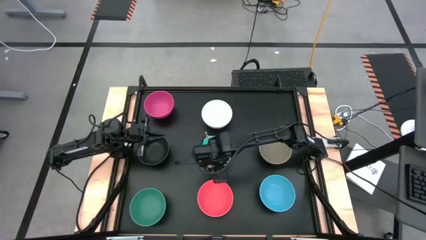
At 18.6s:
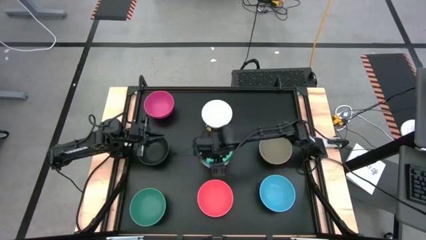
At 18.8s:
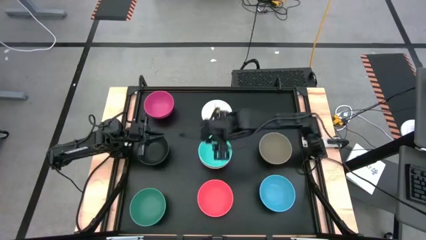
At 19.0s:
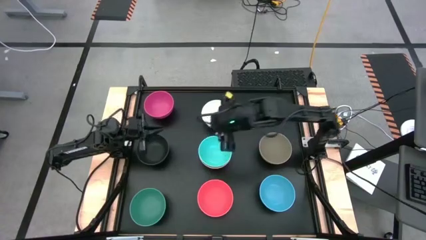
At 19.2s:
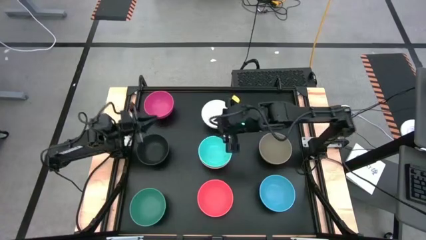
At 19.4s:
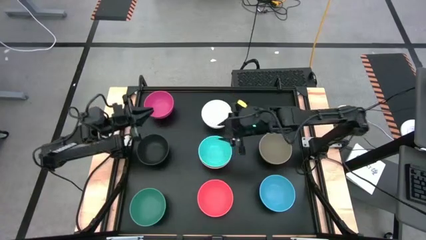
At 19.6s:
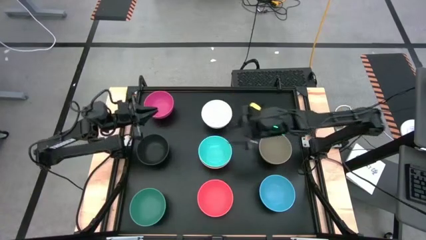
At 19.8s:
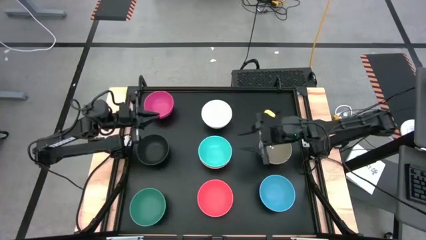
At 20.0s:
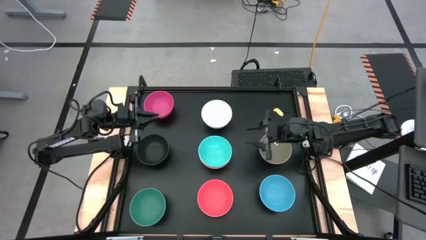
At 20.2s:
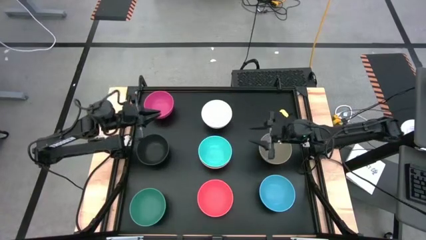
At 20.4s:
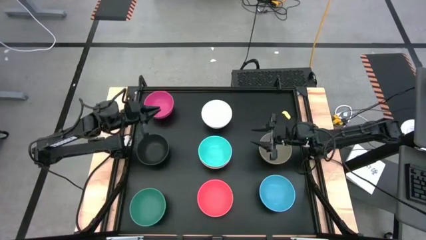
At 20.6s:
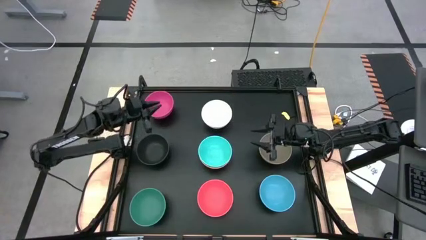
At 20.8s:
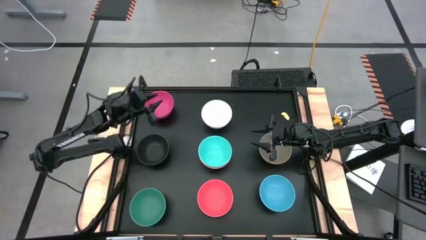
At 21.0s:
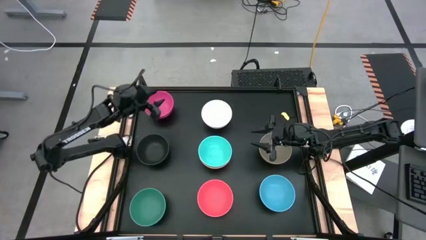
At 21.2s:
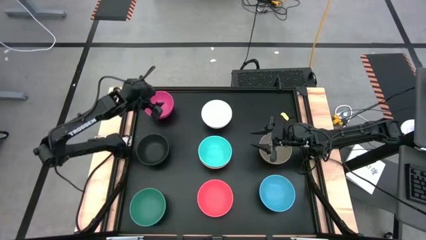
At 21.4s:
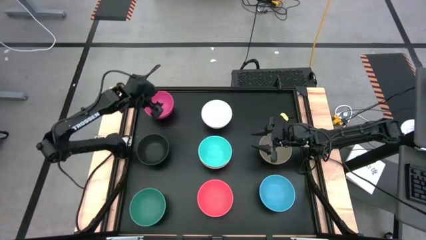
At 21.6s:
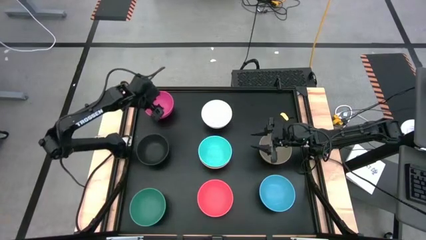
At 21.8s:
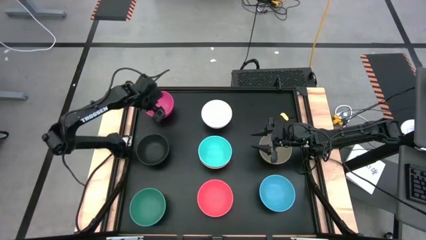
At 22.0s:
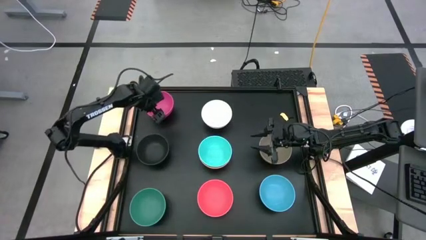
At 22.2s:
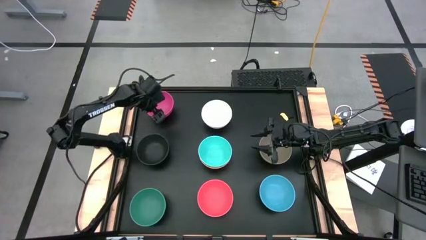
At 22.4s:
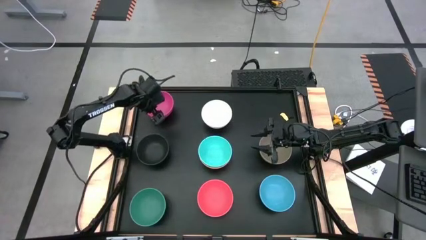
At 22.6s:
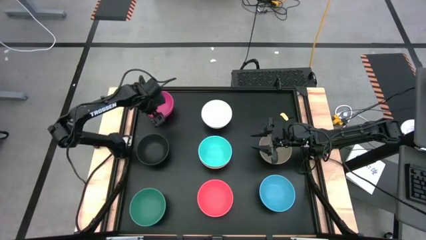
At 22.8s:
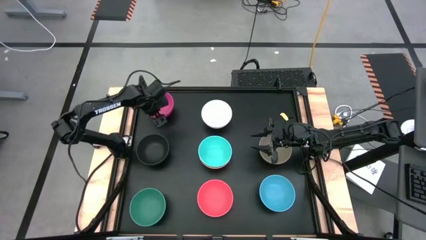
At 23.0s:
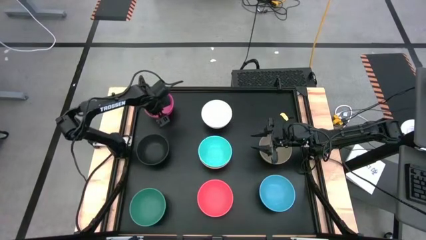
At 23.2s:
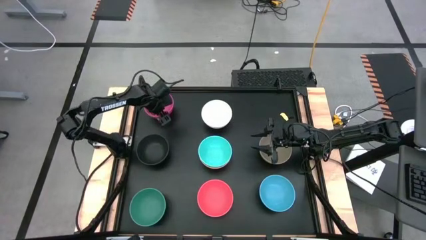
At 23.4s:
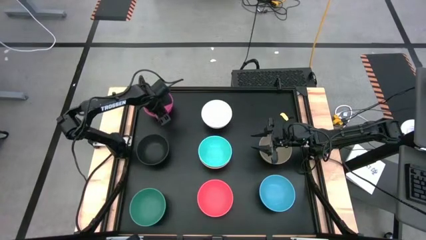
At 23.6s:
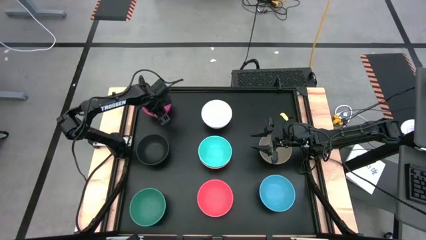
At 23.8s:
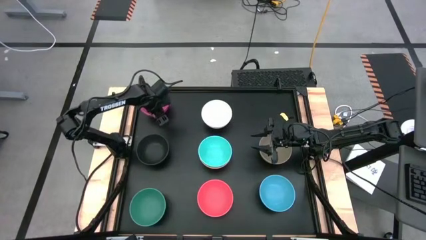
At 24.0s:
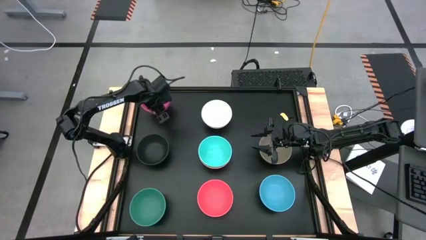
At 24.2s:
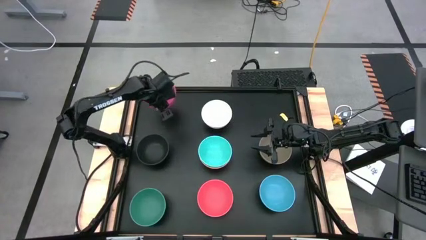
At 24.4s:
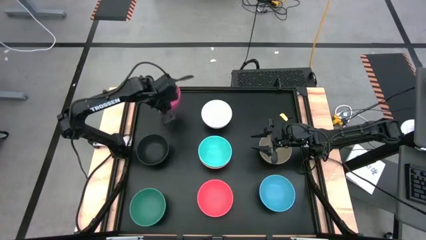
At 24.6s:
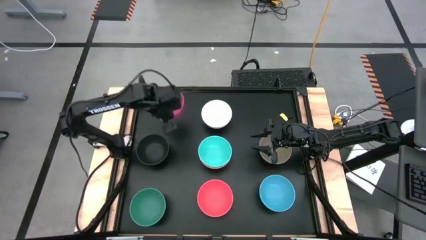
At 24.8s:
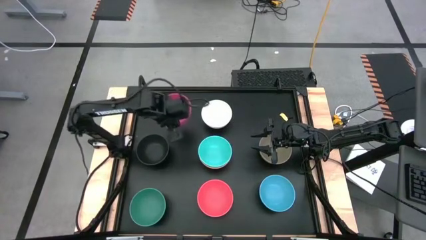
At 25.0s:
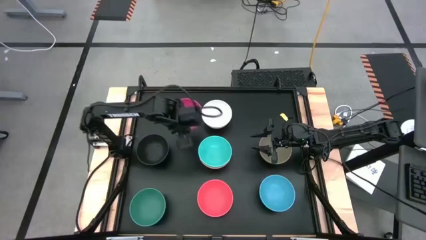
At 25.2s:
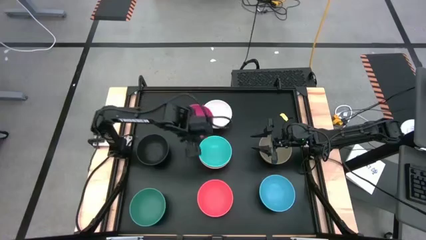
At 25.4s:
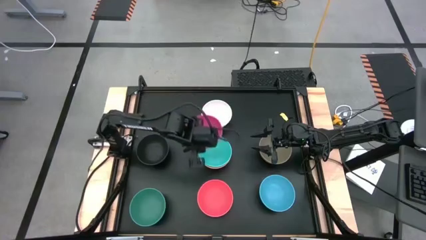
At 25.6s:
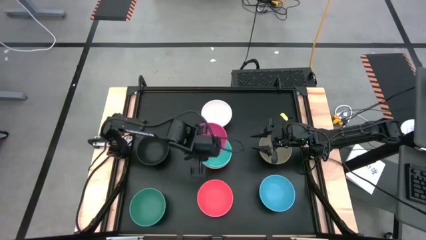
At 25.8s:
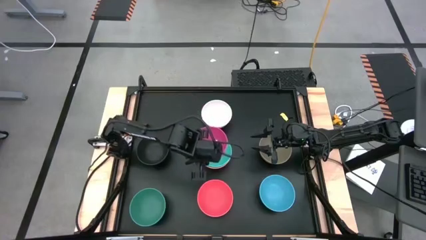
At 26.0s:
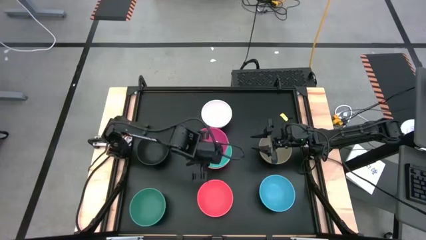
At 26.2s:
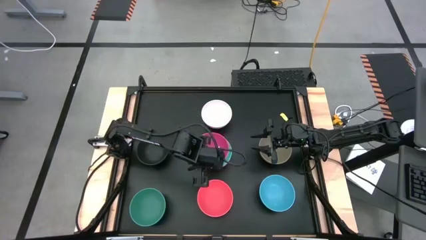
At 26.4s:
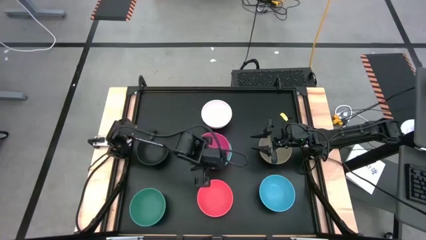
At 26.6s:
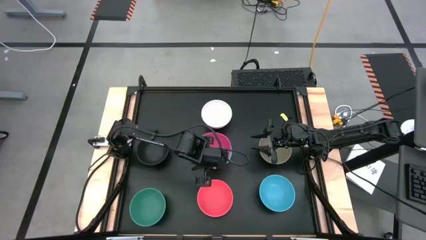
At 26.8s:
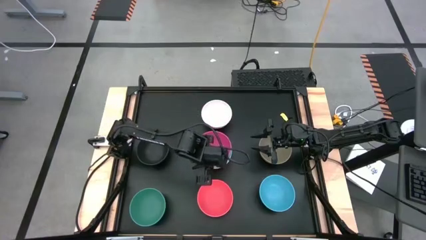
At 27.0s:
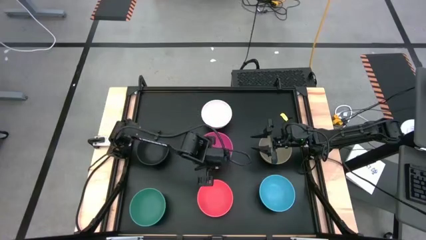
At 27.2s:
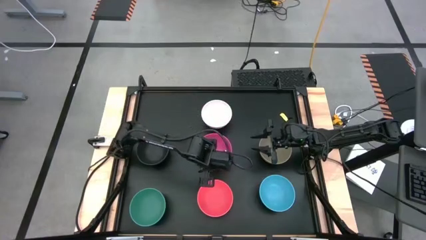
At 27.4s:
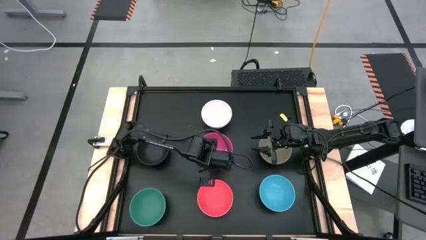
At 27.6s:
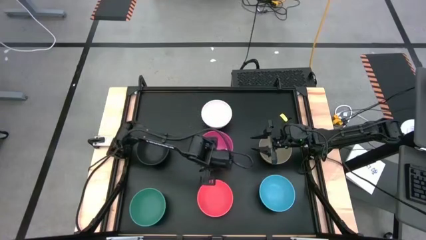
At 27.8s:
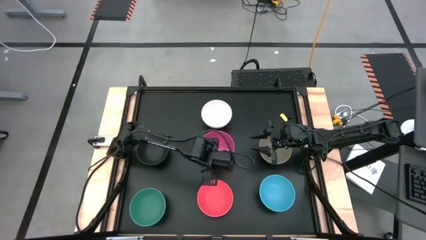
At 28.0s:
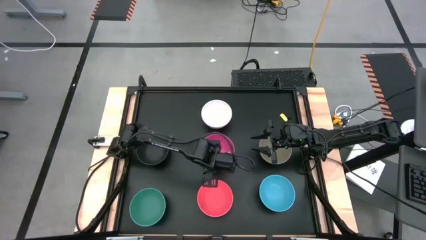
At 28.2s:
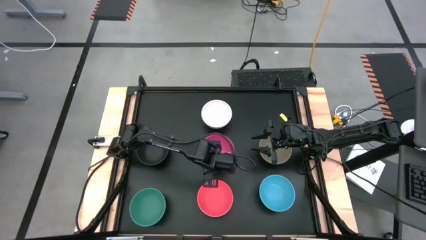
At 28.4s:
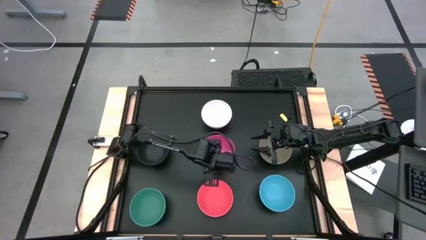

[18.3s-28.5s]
Task: Nest bowls inside each other
Stack the pink bowl on top of the light blue bowl

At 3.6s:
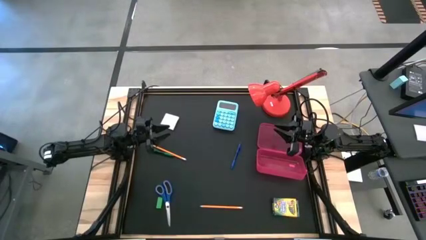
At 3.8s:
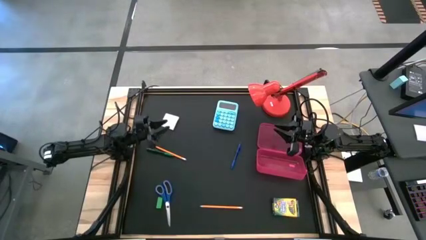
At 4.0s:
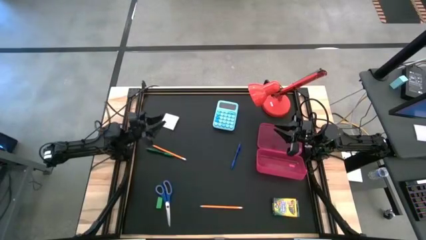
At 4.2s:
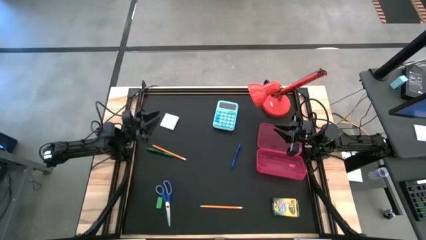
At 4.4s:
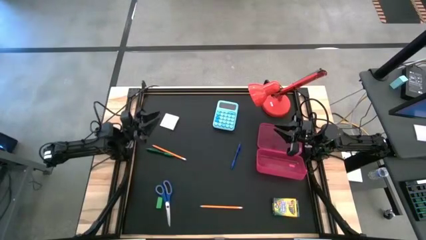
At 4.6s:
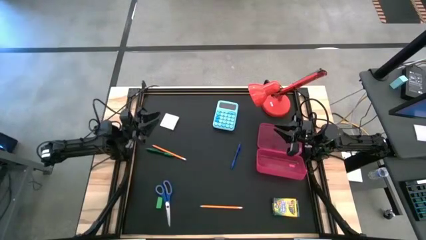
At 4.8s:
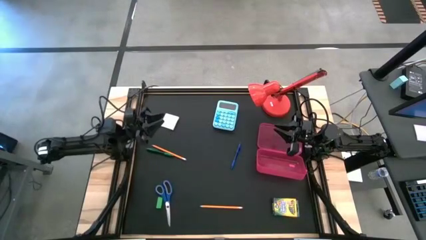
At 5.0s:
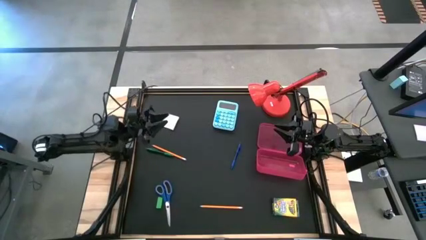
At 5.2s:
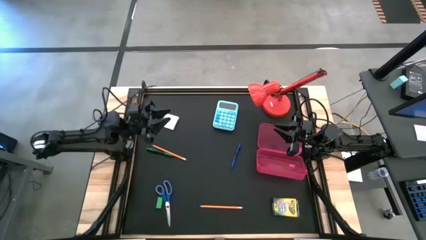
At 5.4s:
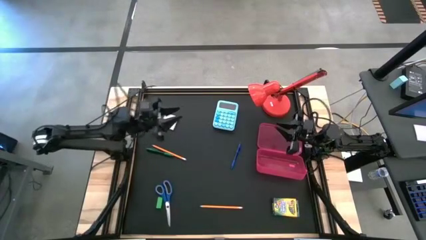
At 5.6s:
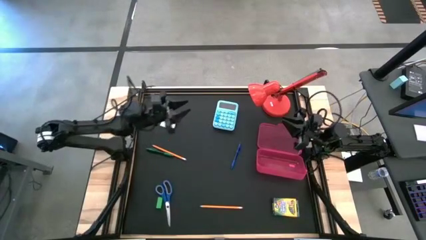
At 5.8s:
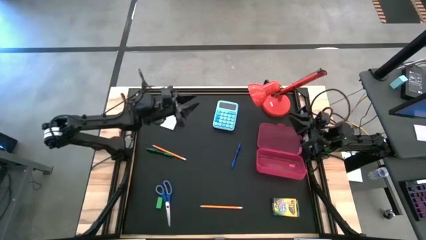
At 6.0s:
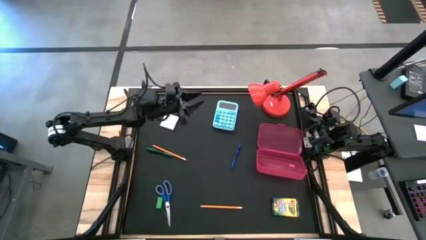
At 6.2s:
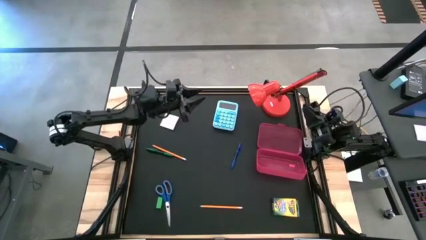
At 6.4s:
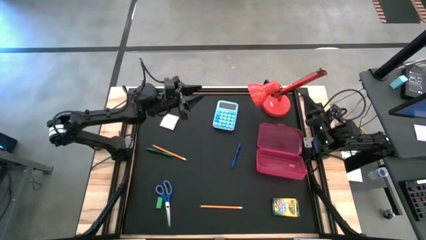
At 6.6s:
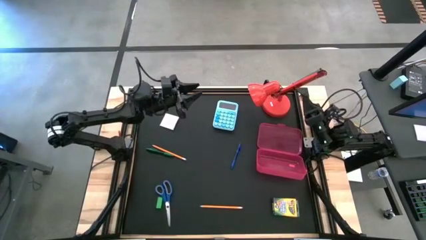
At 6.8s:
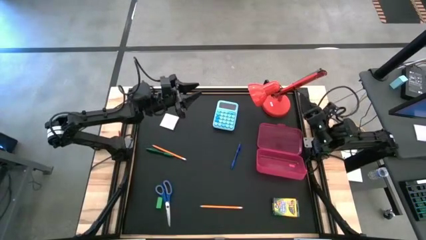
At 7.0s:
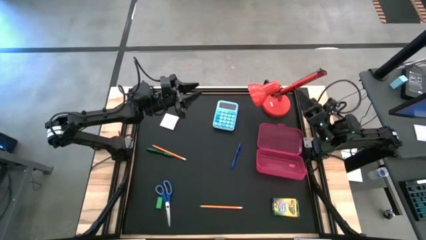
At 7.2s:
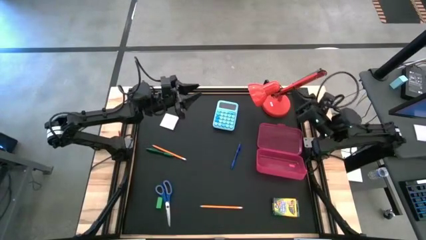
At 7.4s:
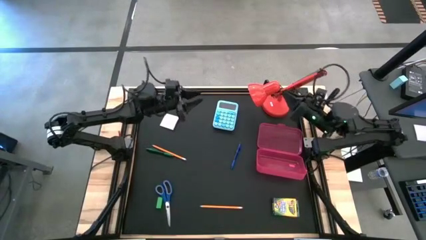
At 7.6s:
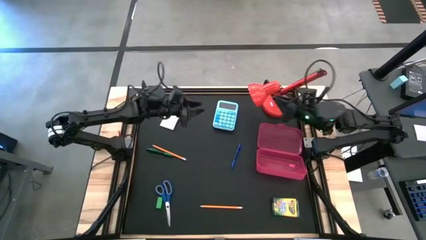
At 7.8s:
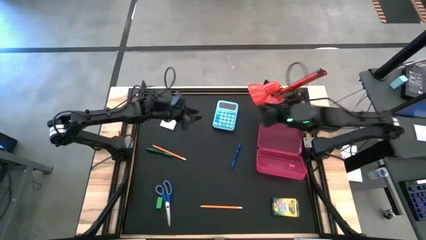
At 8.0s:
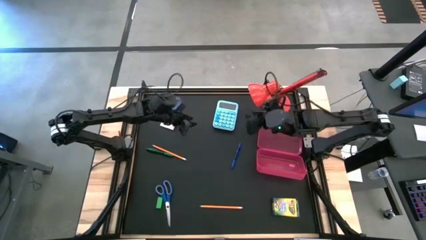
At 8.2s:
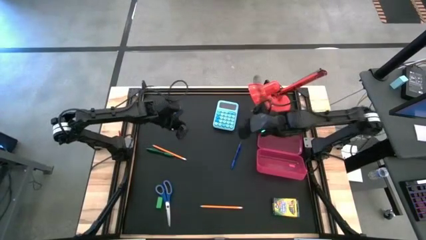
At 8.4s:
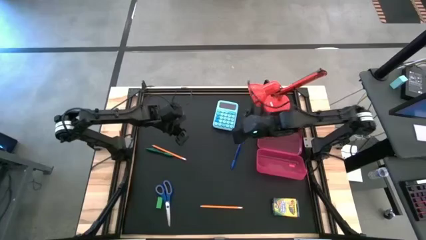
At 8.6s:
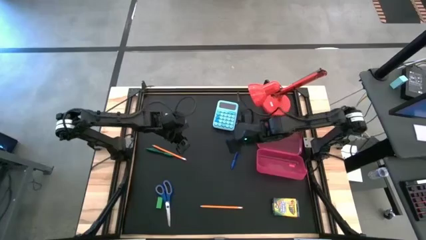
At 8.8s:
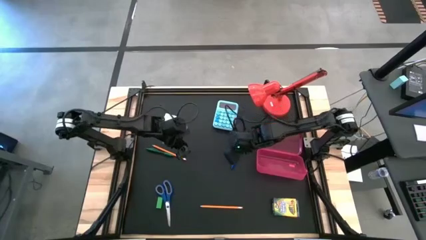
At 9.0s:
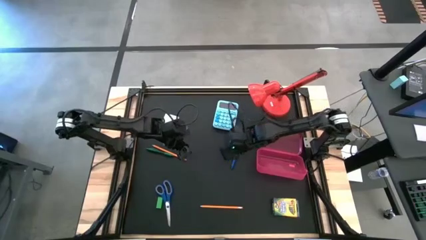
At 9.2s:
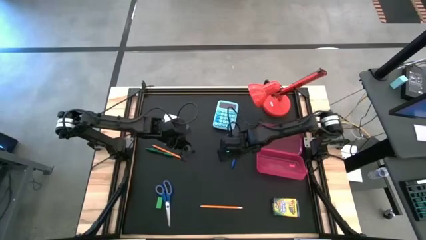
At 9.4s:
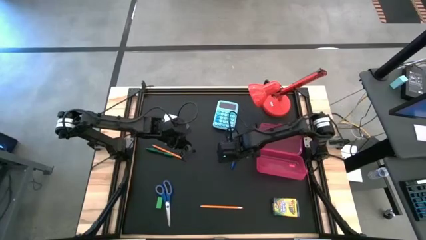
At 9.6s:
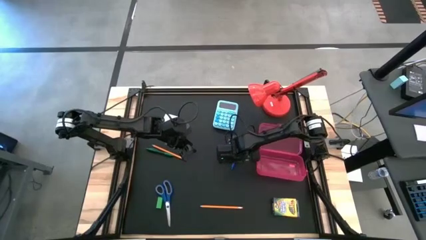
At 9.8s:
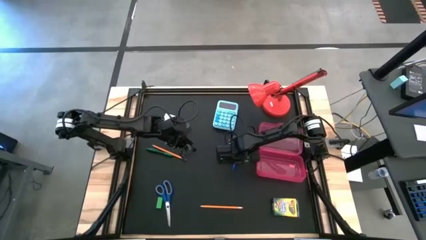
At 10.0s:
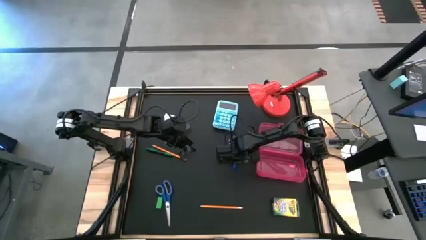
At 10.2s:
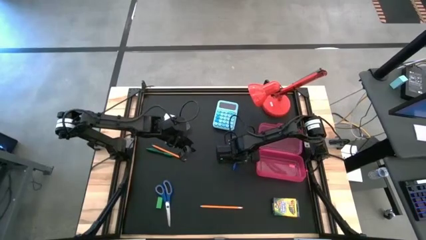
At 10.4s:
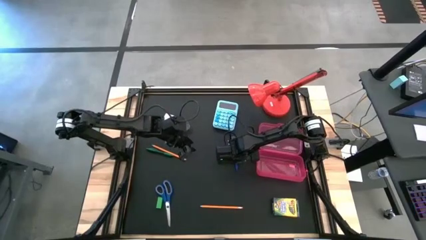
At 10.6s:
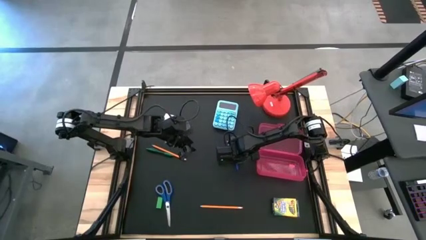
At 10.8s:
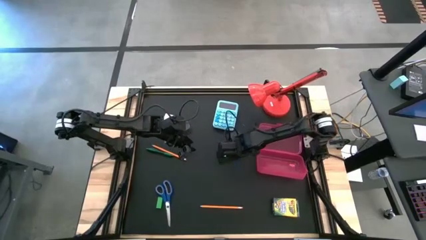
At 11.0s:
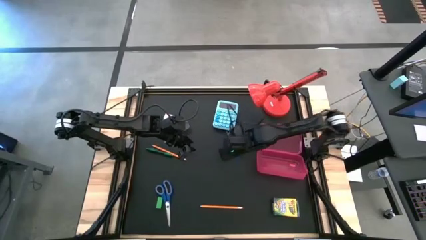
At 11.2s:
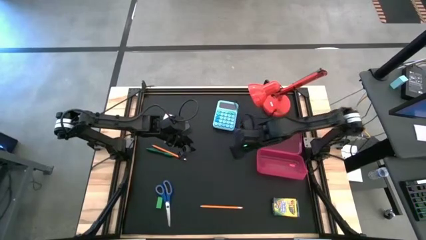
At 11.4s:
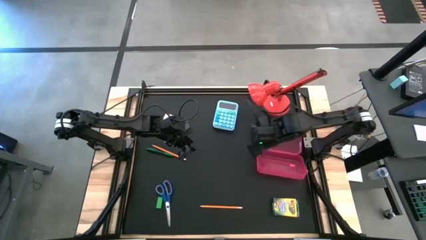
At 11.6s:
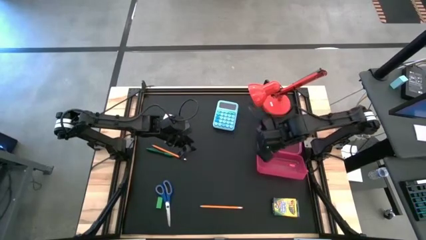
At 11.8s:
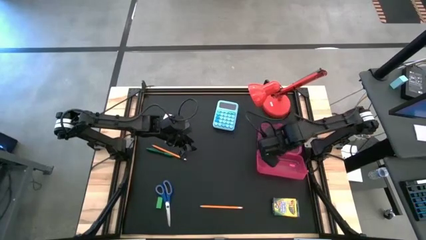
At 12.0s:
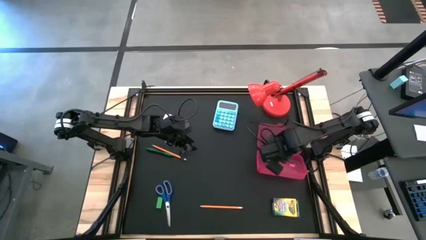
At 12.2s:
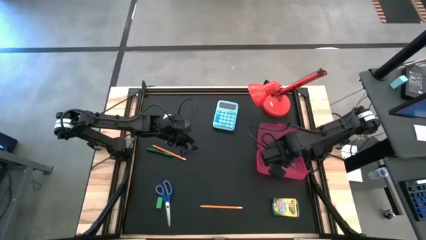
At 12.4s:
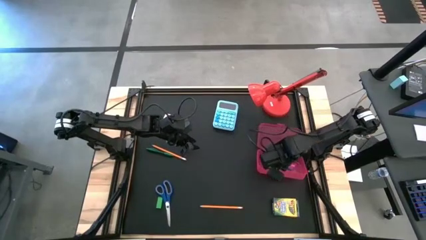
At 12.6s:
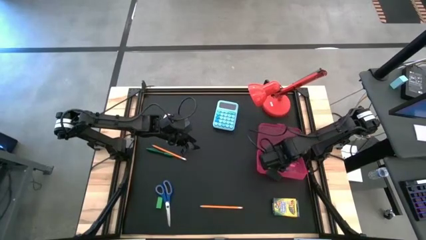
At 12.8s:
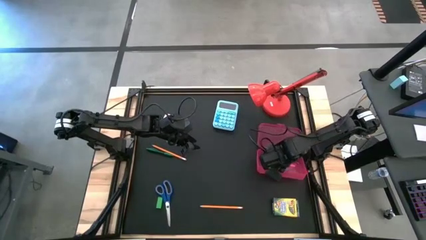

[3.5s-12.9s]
Task: Pack school essentials
Put the blue pen into the red supply box
